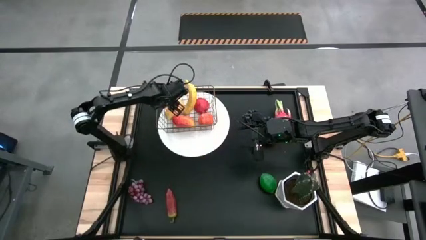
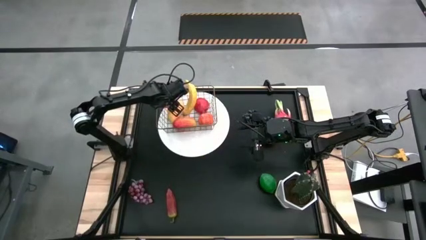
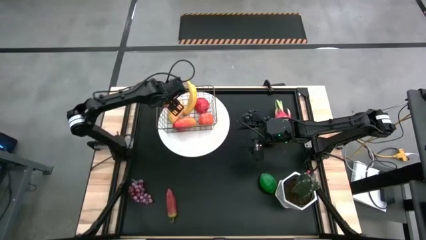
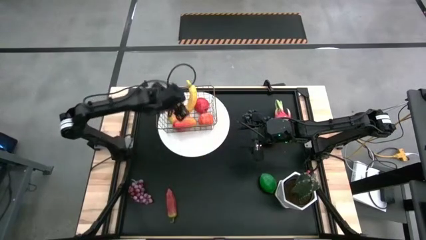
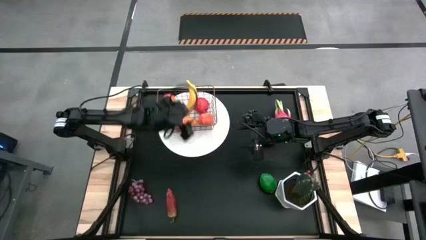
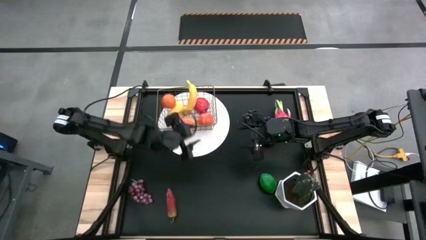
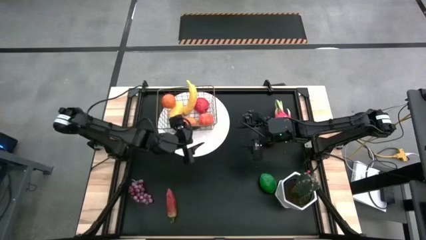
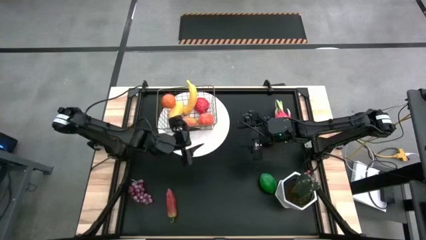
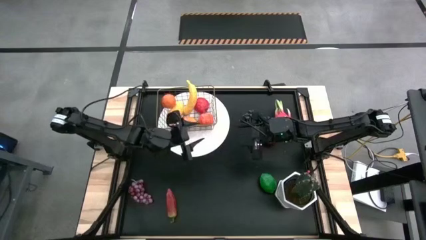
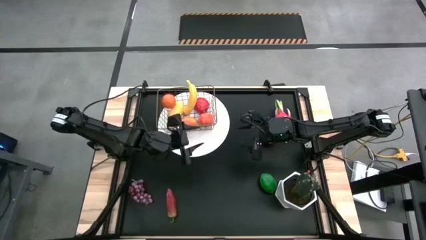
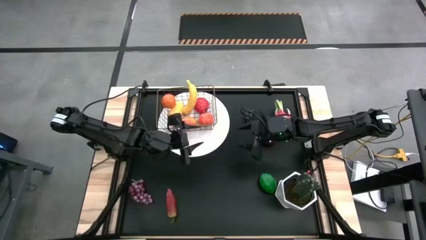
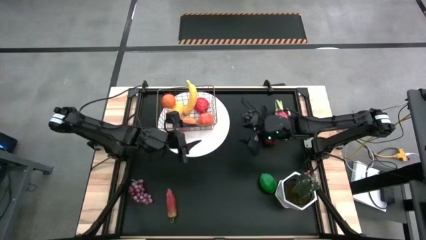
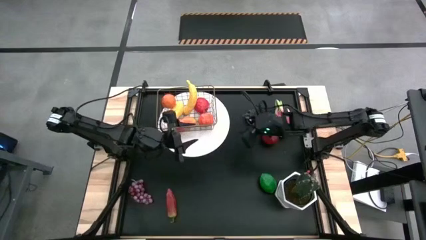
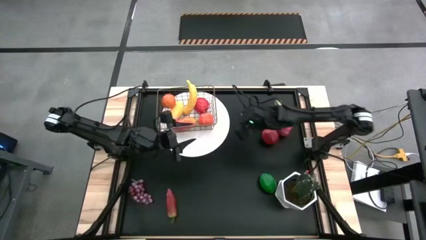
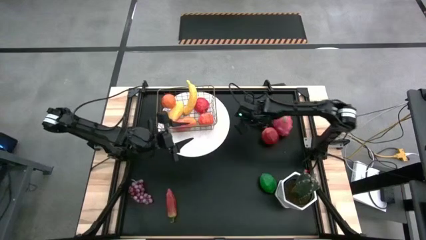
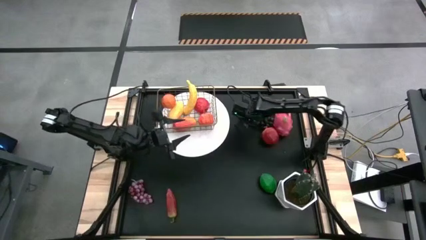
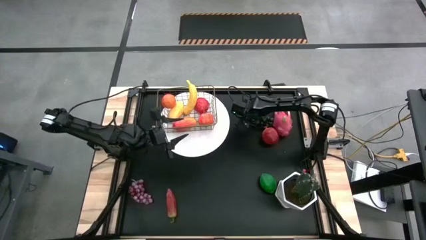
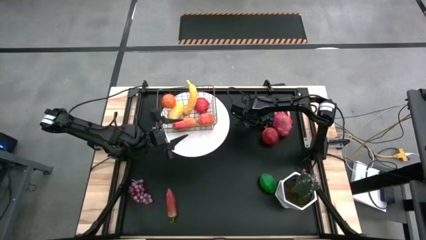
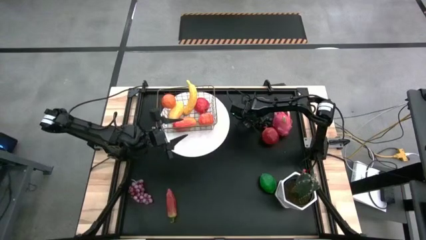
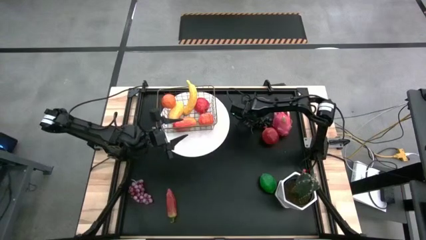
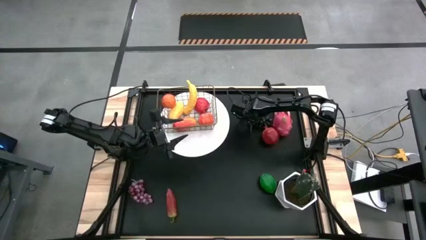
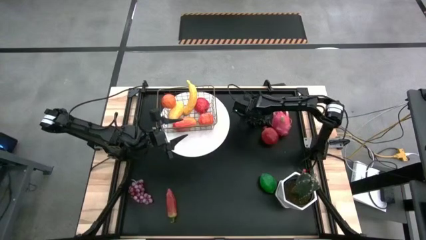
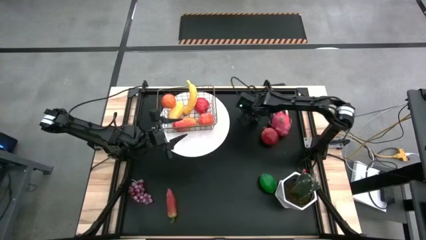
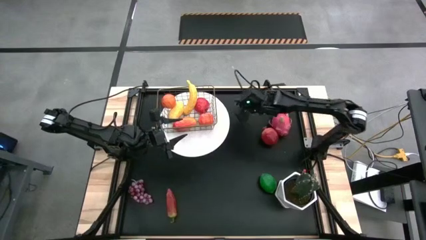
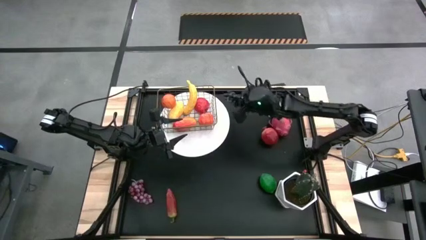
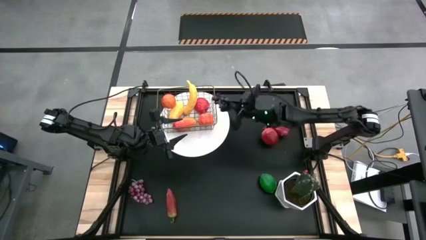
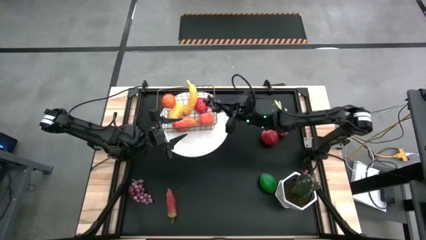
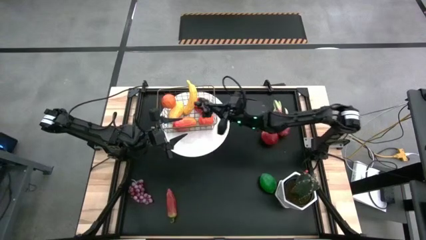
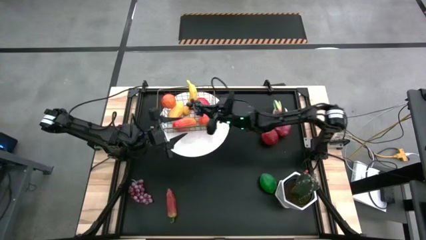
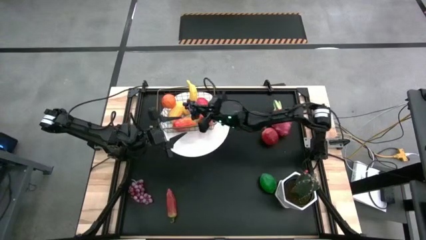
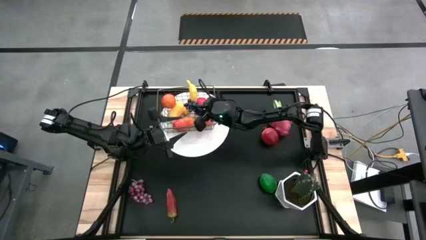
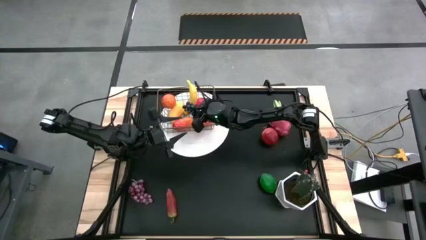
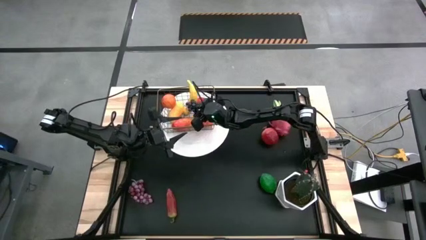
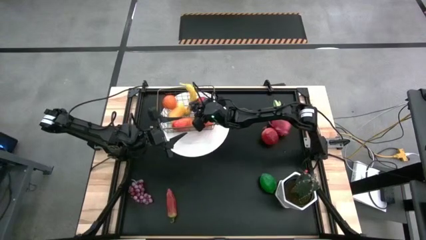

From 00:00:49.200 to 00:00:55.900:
Task: Build produce basket
Put the black grapes into the wire basket

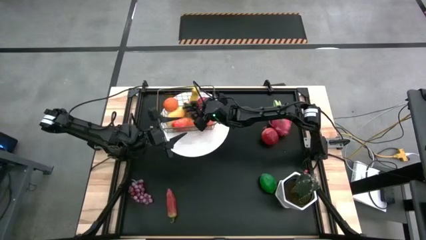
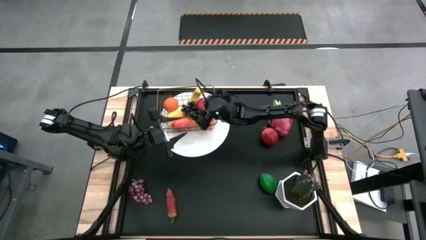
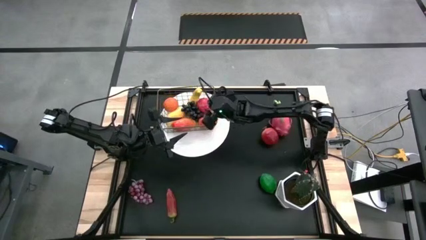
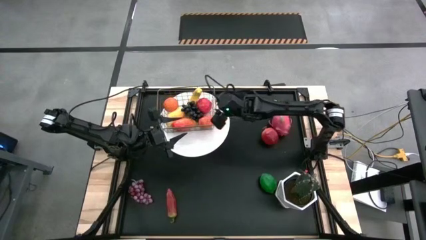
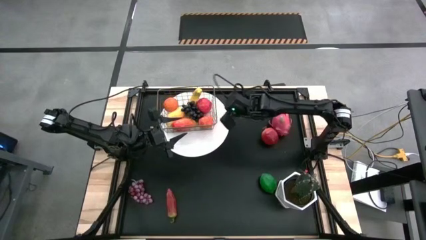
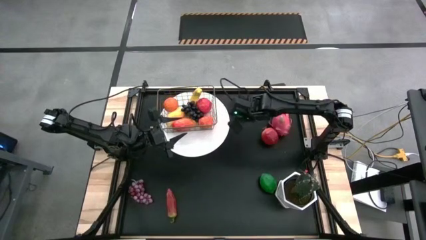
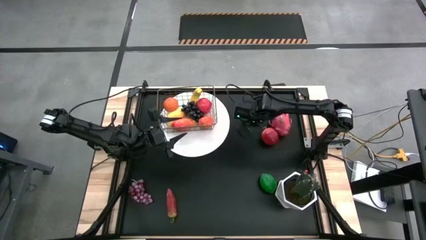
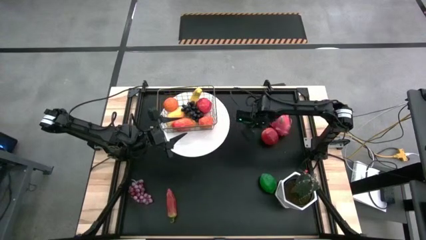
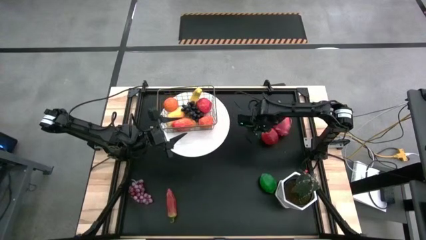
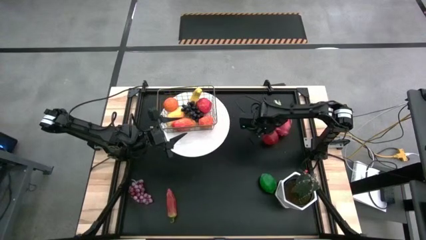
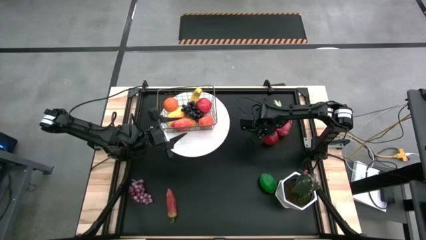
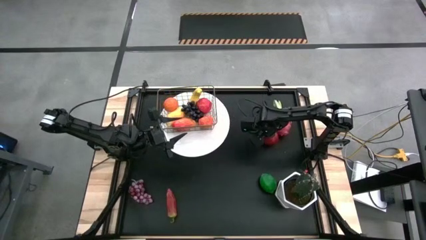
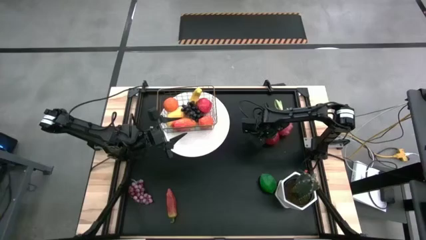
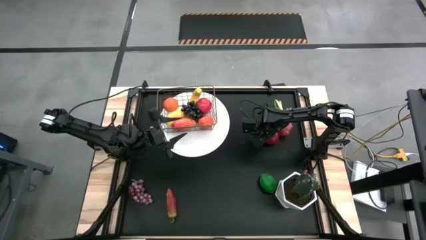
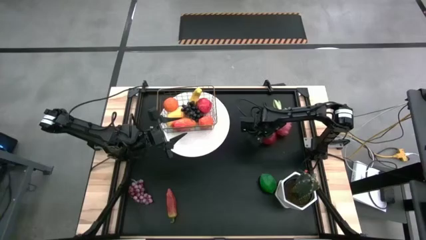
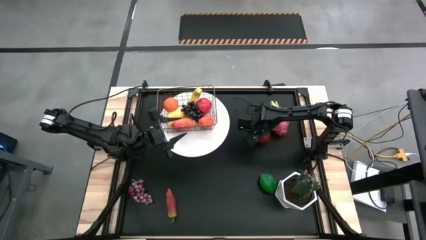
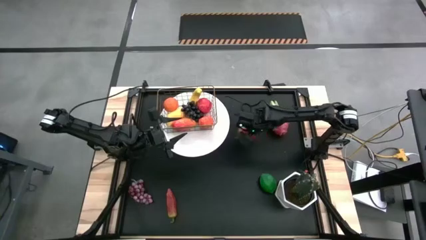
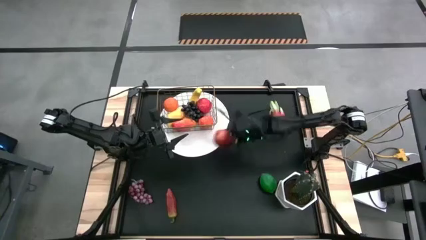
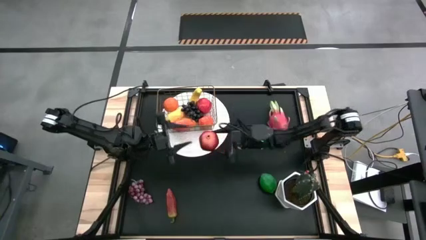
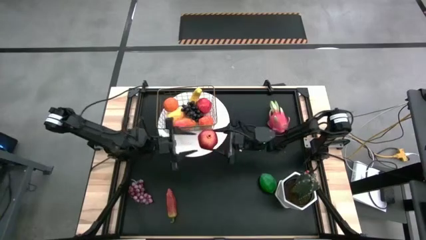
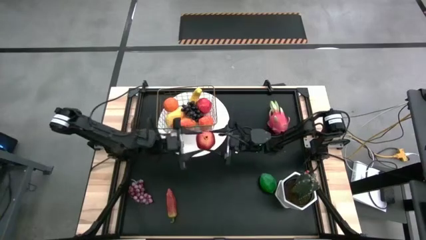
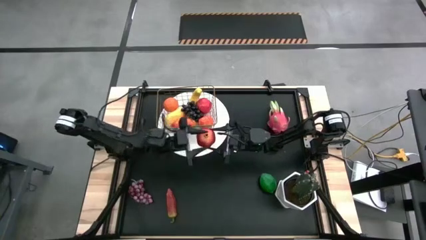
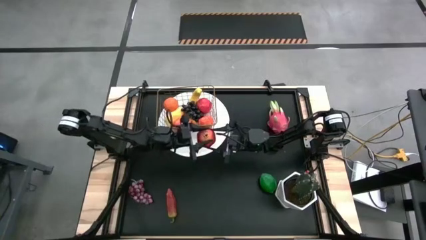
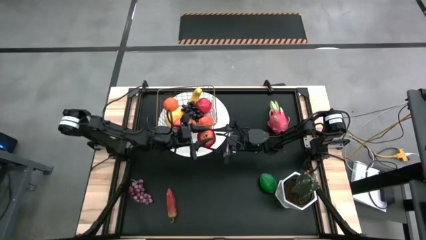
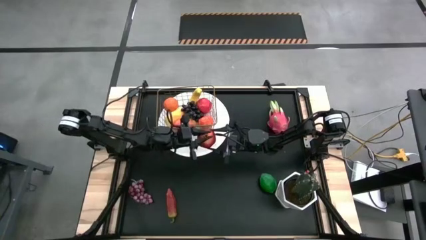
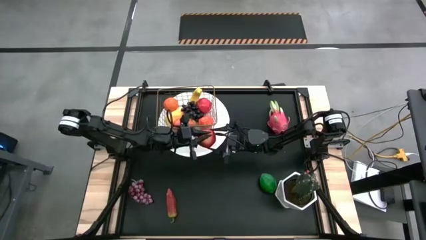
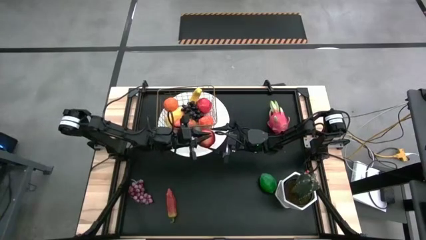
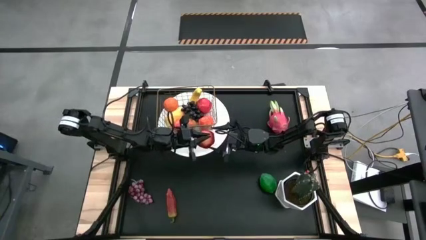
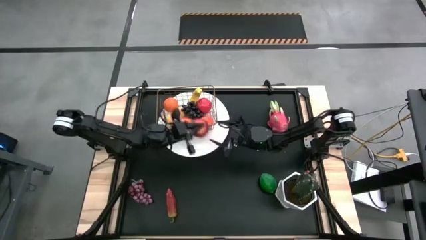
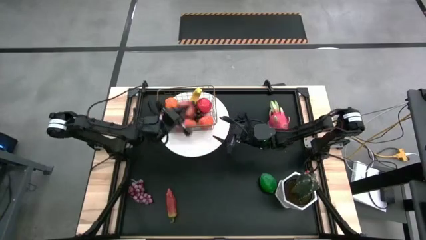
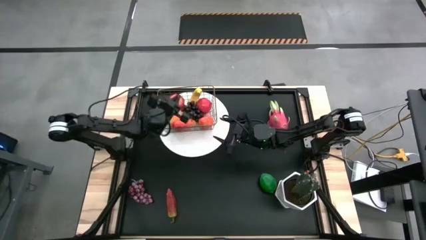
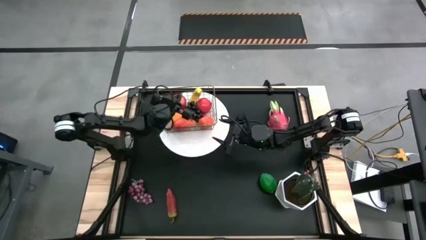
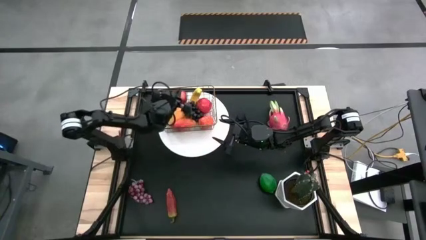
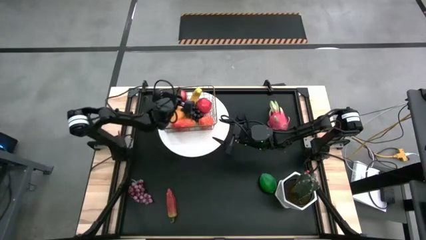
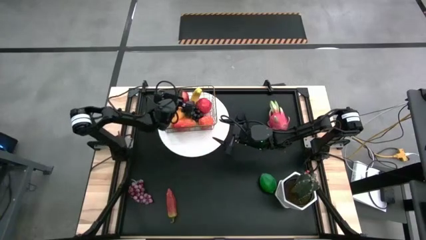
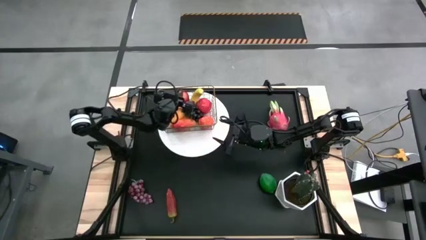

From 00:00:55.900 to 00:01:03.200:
Put the pomegranate into the wire basket
